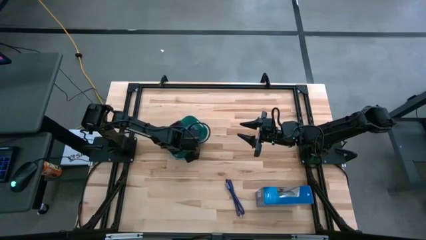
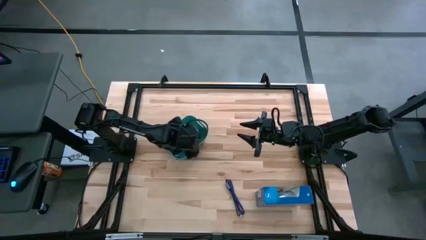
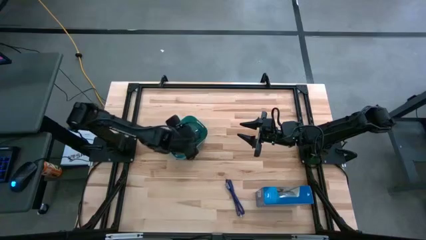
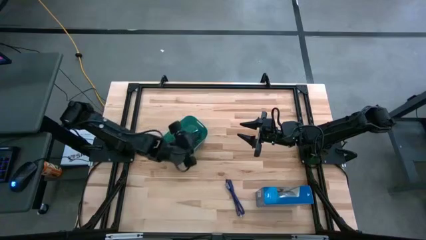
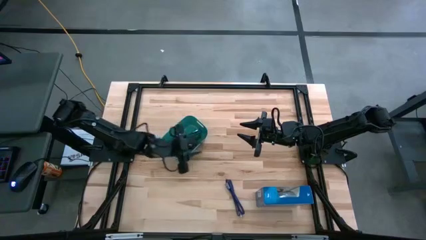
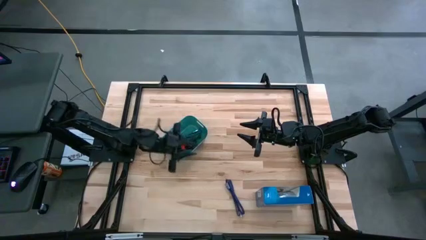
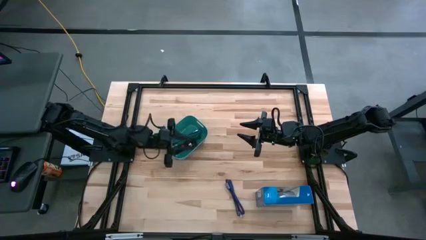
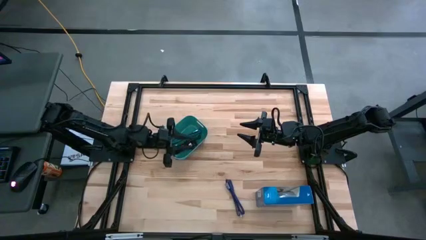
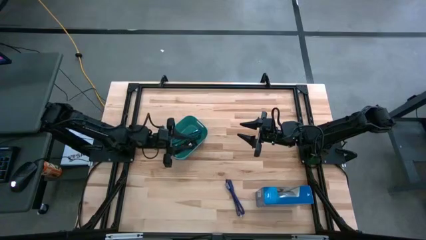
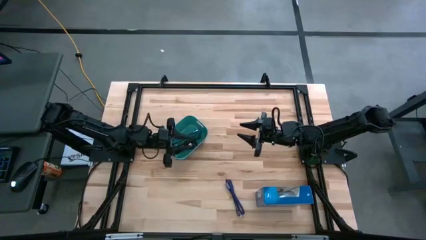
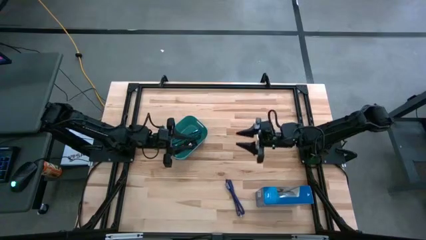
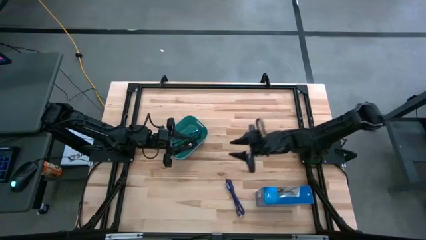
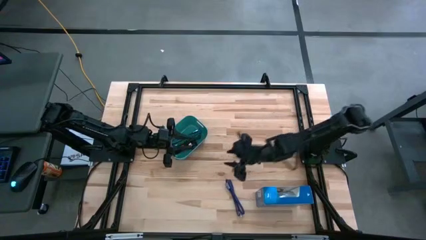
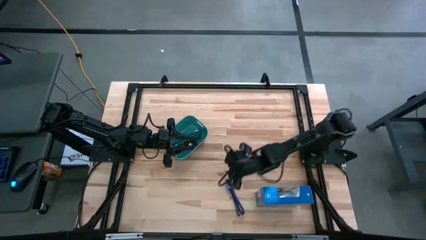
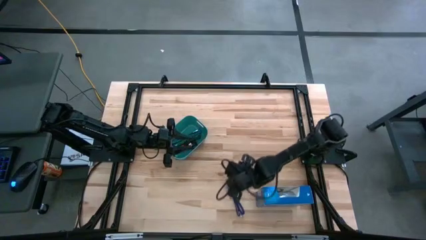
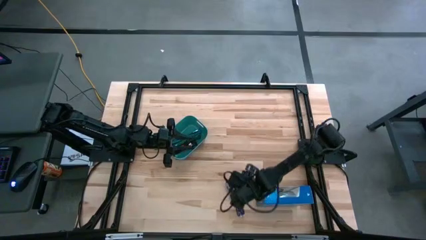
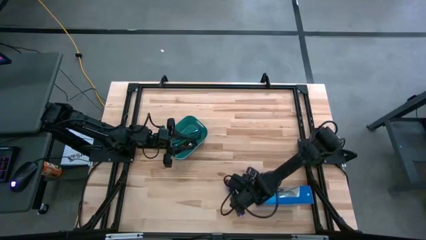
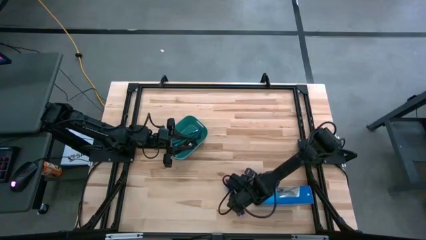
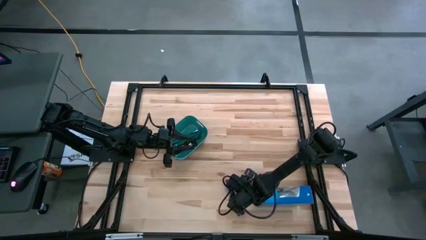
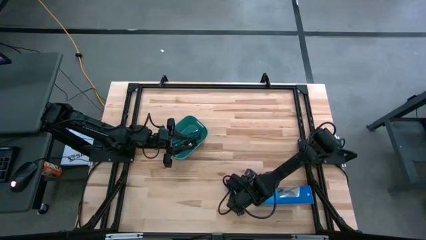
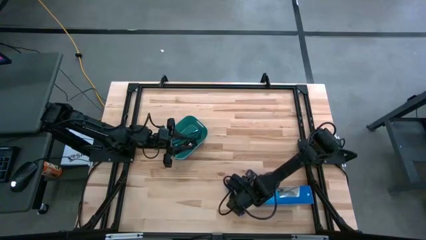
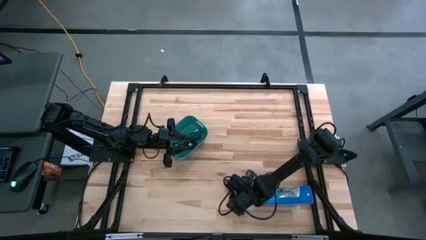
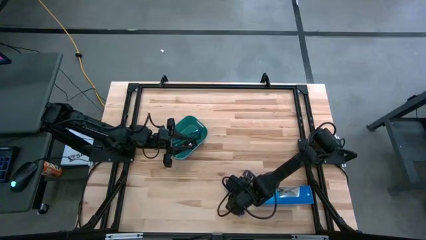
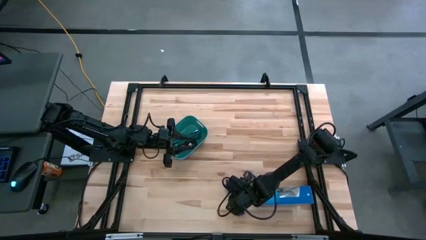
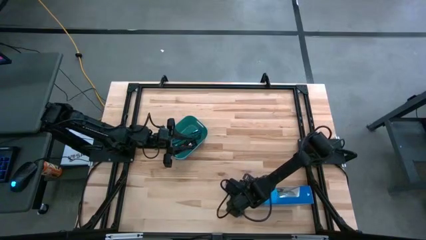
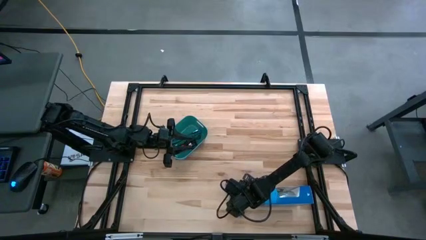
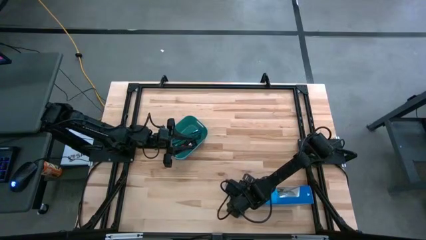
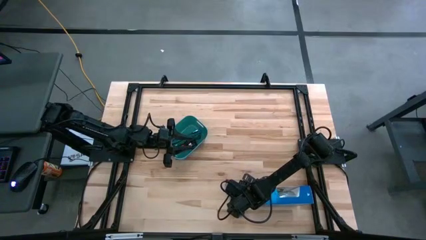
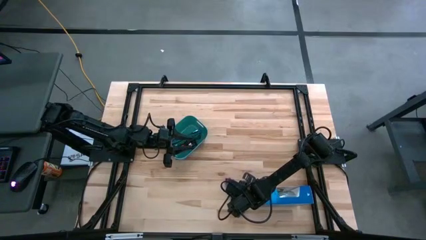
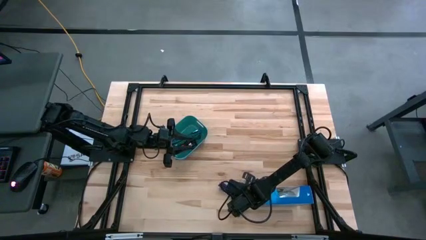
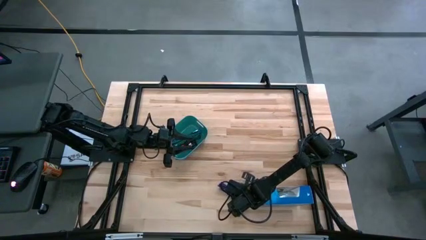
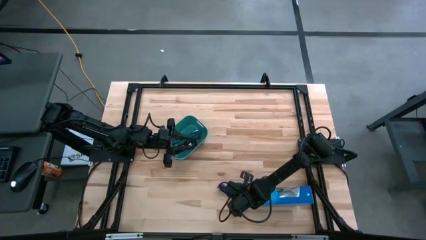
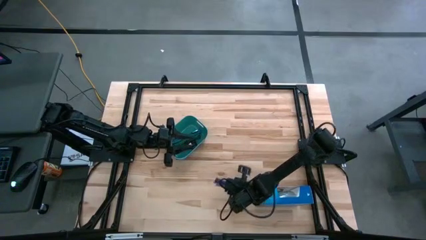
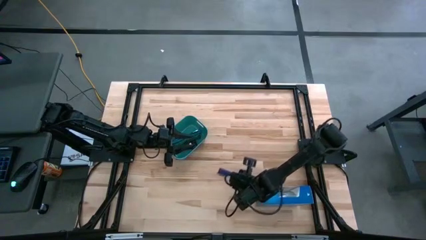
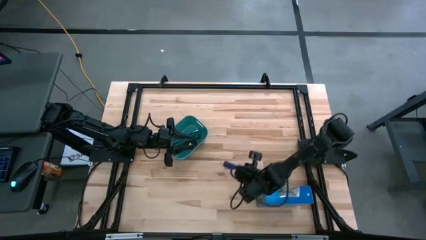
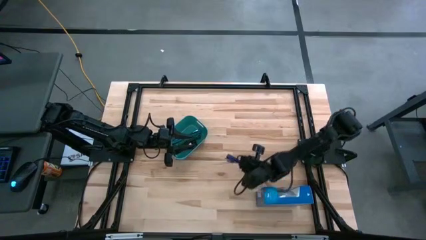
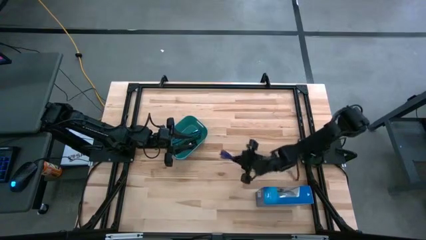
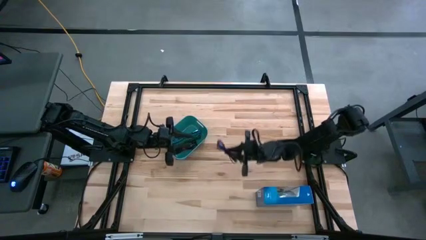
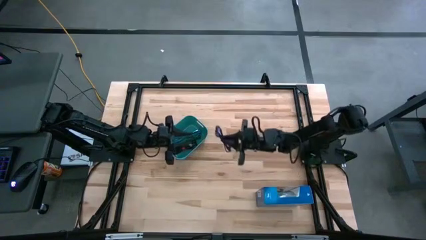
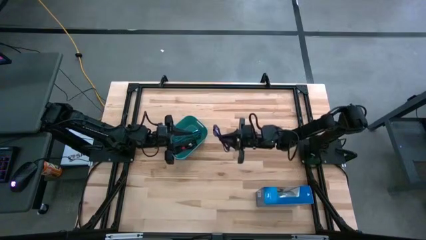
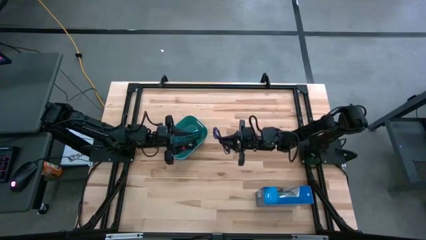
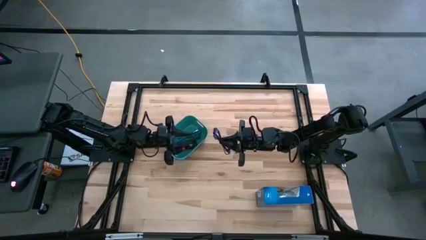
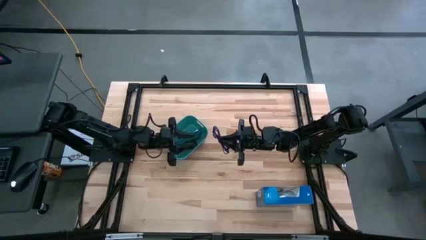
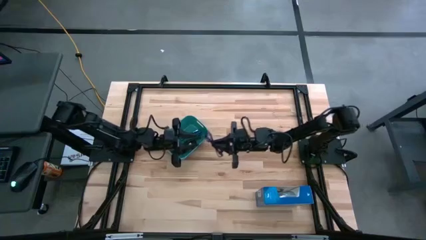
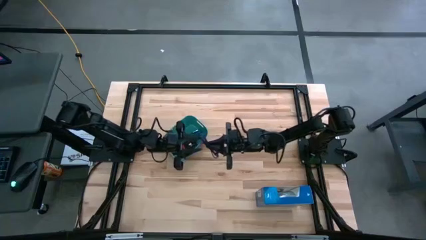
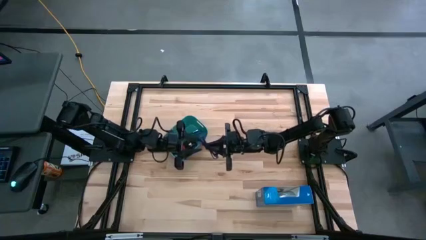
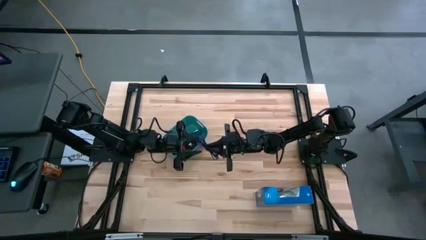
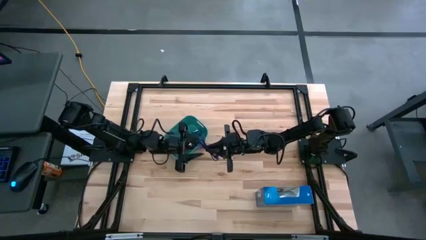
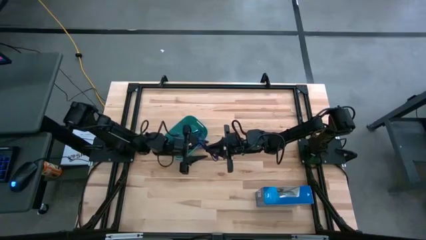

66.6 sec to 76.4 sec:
Task: Pick and place USB-C Cables
Put the dark blue charger cable into the bin

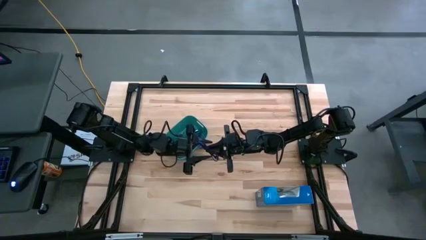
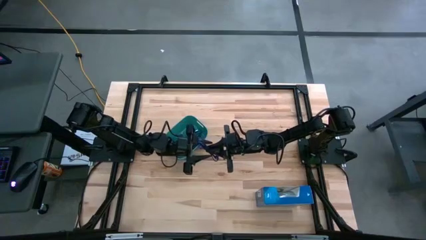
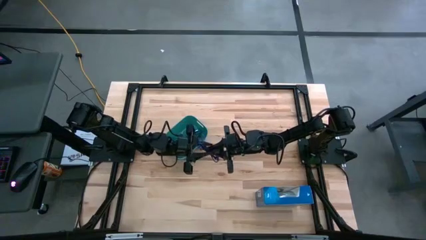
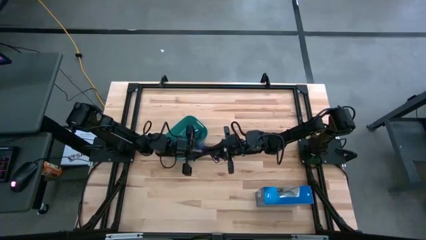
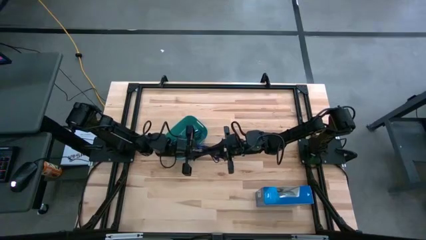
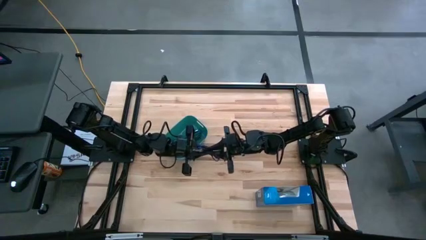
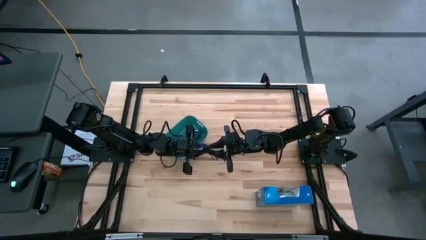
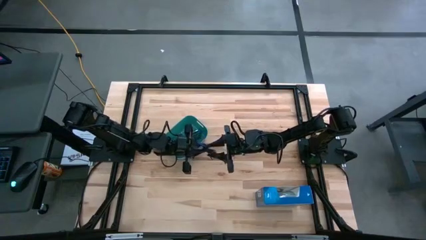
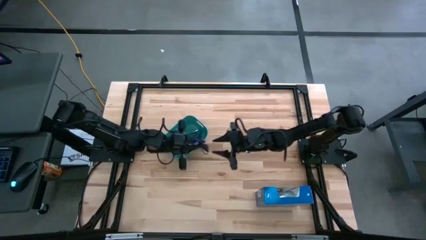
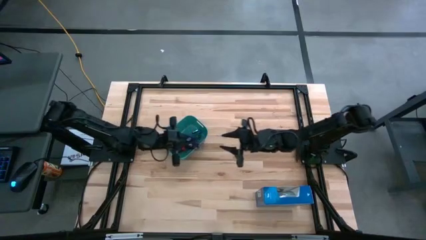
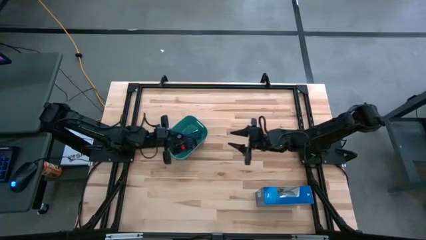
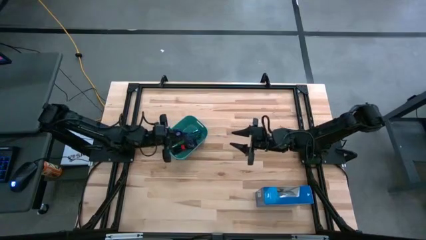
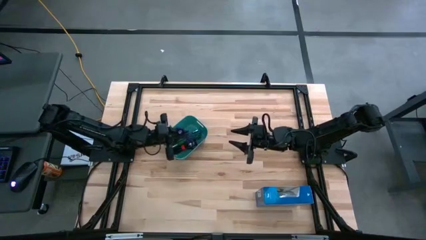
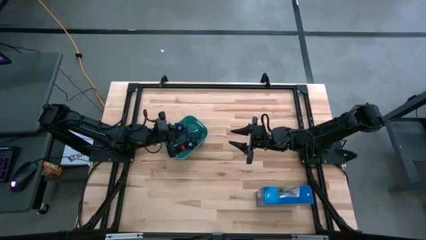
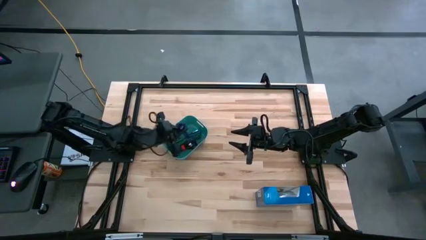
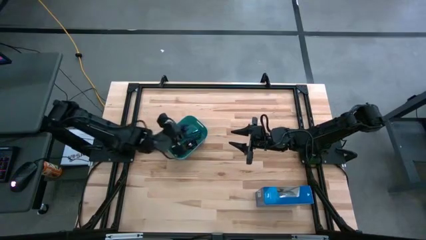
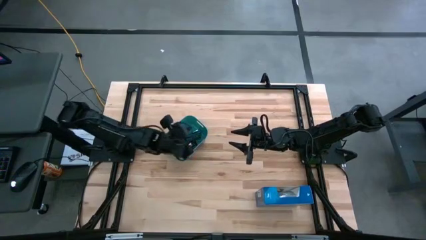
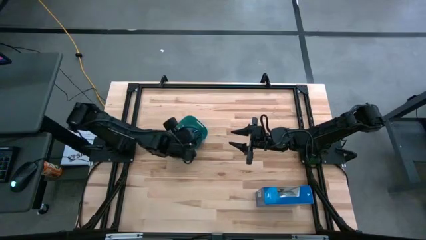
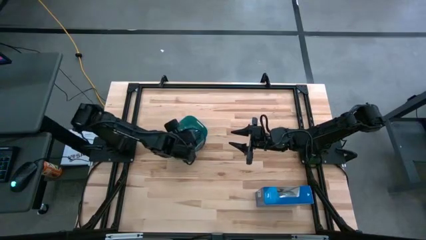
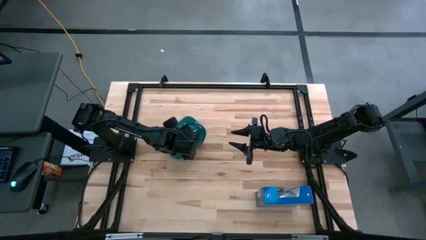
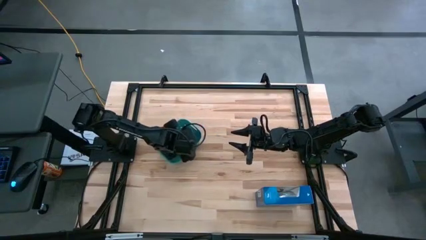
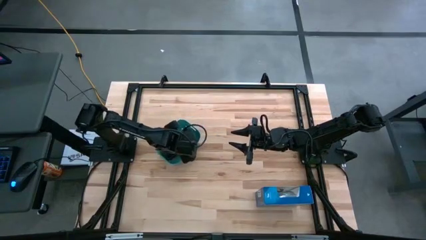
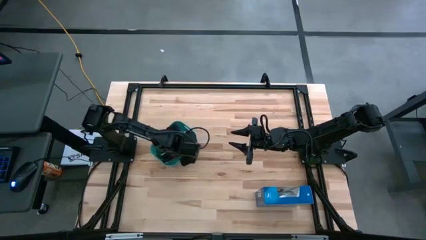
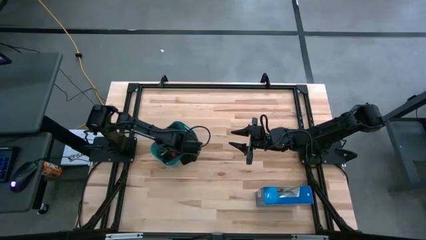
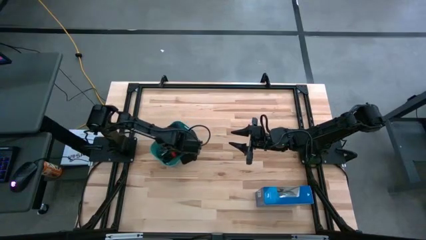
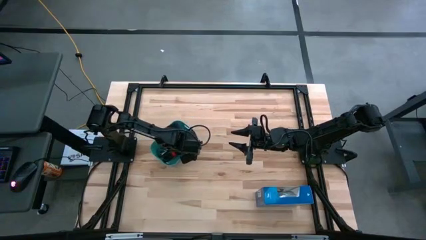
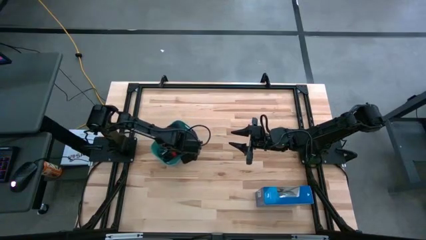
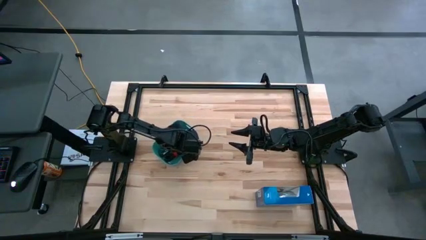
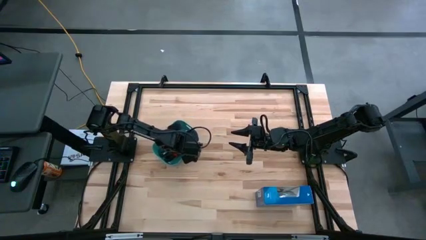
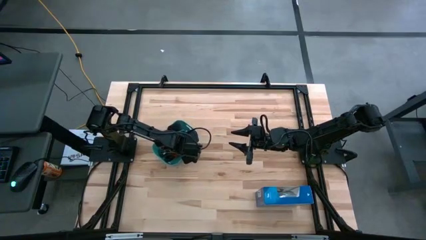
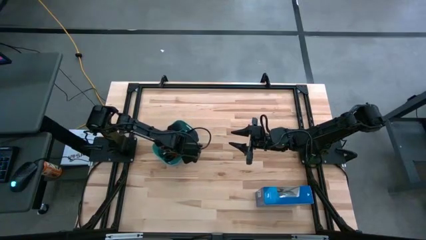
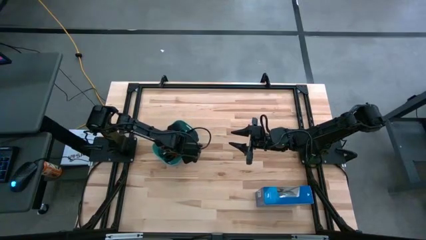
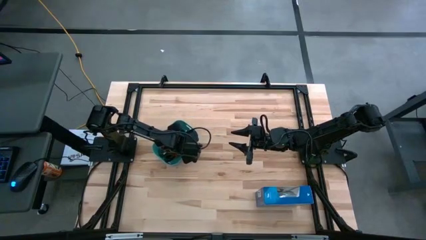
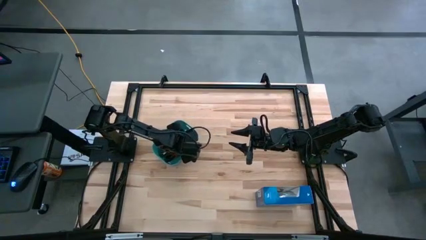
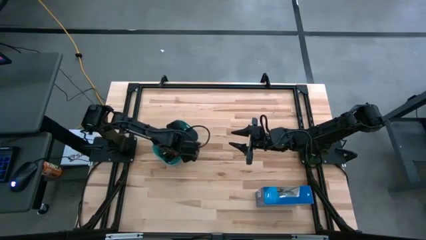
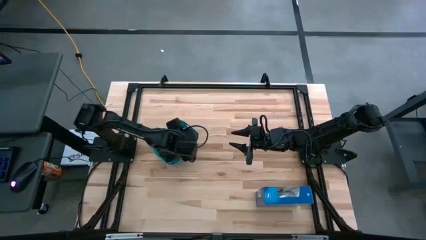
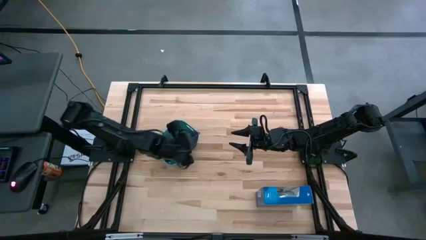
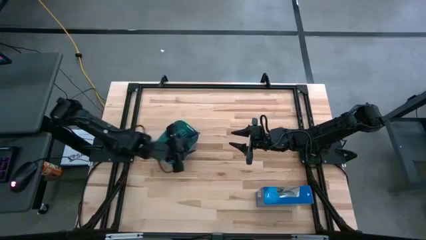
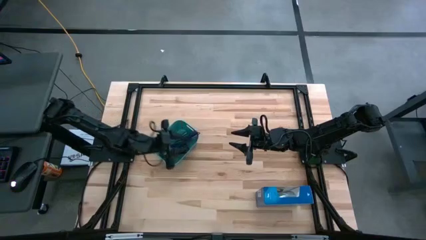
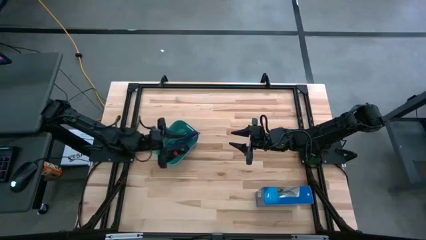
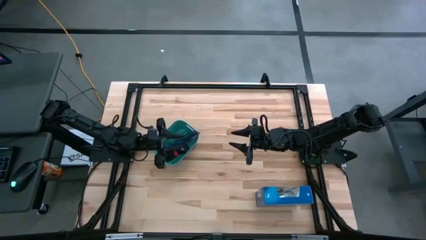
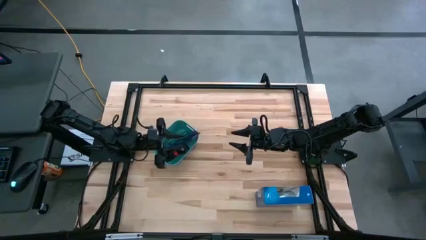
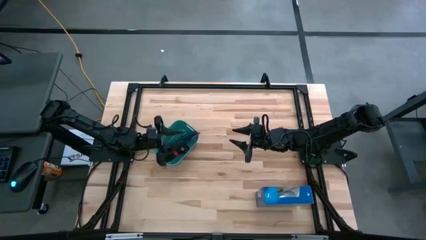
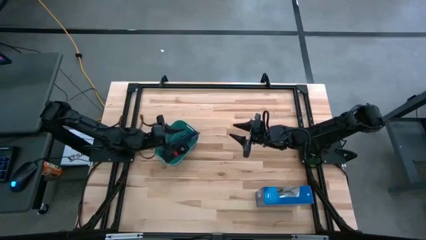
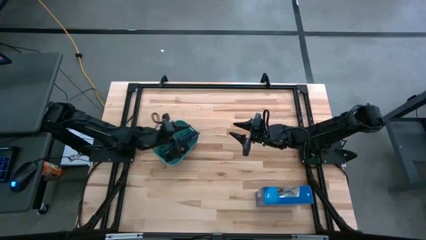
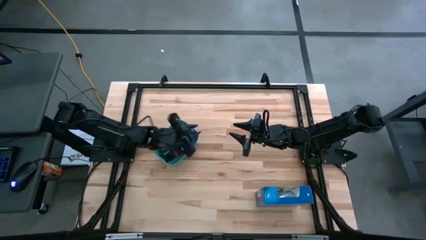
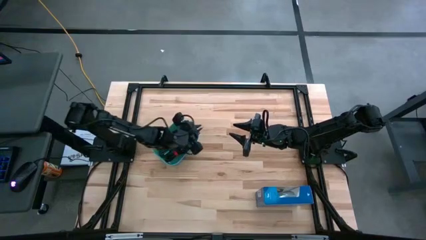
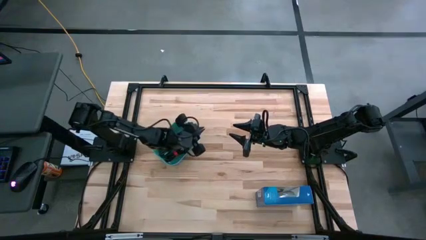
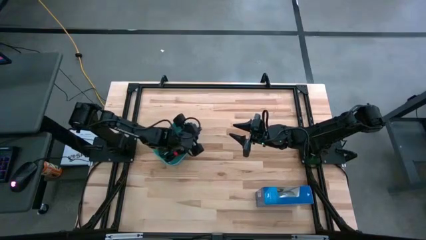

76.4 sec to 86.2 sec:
Put the dark blue charger cable into the bin
